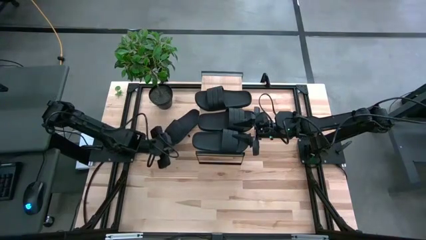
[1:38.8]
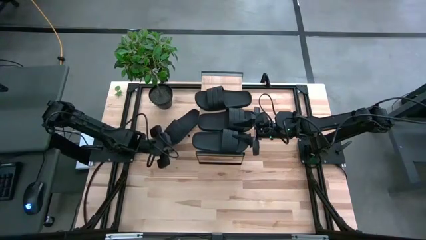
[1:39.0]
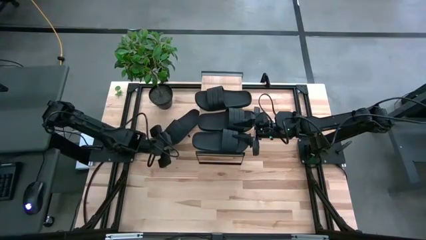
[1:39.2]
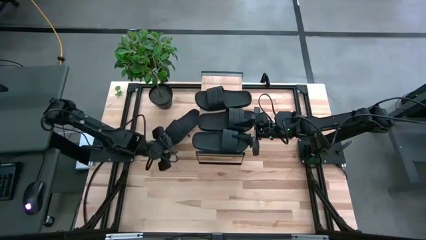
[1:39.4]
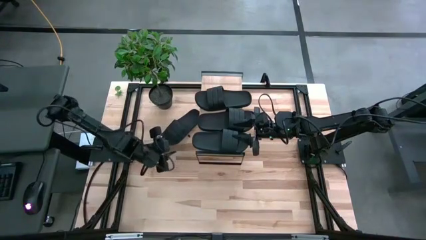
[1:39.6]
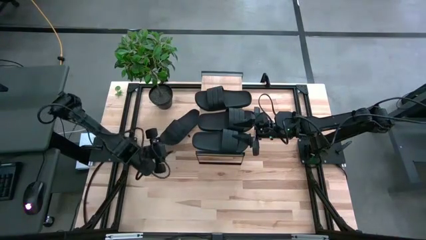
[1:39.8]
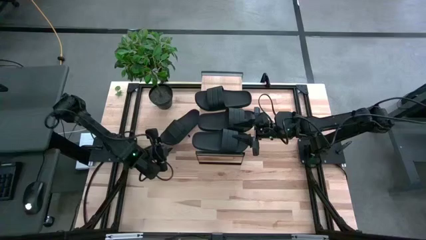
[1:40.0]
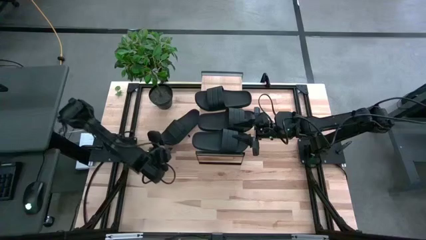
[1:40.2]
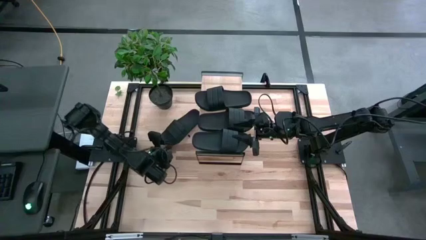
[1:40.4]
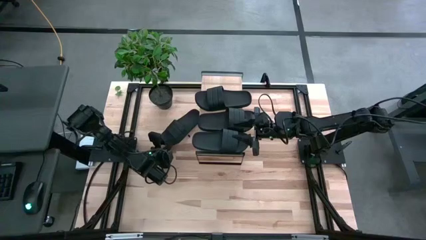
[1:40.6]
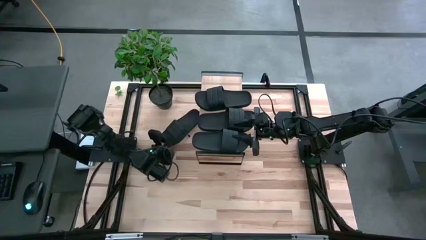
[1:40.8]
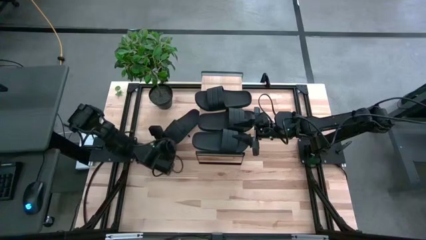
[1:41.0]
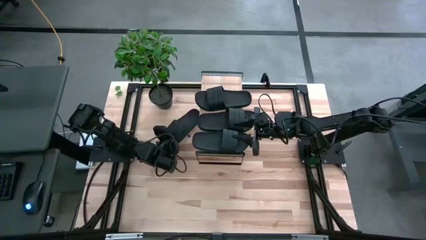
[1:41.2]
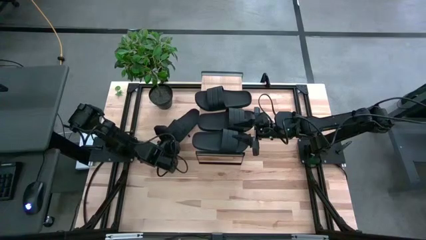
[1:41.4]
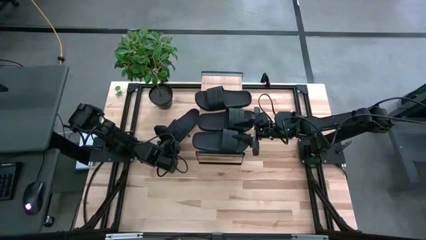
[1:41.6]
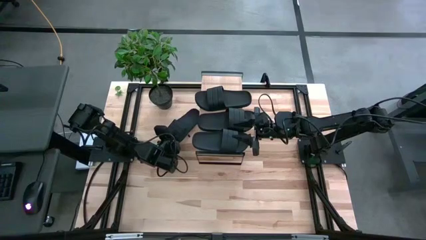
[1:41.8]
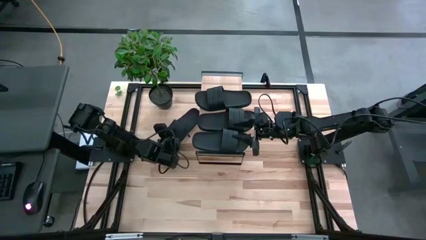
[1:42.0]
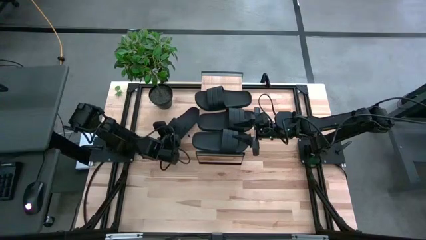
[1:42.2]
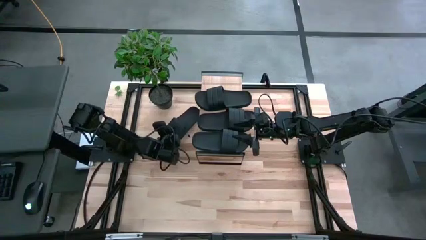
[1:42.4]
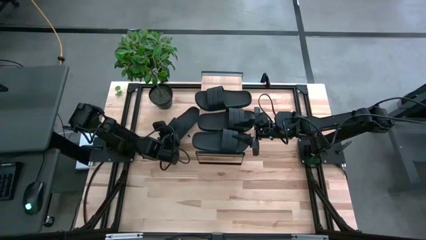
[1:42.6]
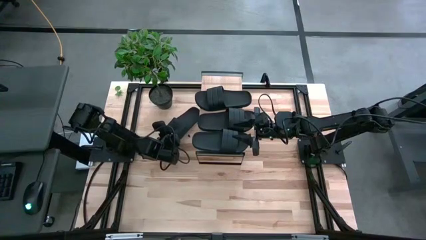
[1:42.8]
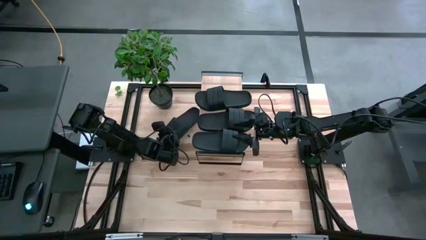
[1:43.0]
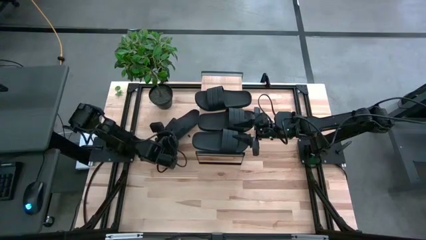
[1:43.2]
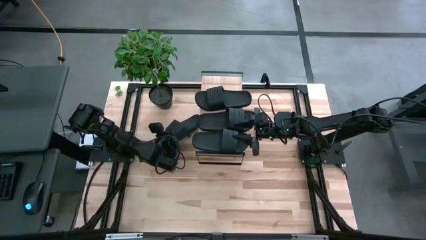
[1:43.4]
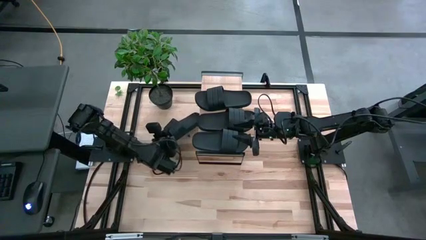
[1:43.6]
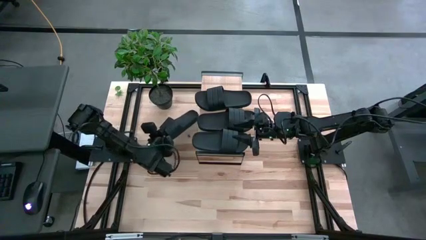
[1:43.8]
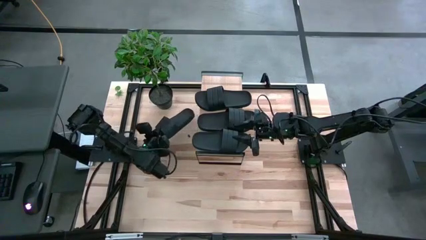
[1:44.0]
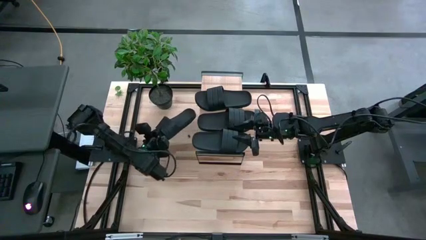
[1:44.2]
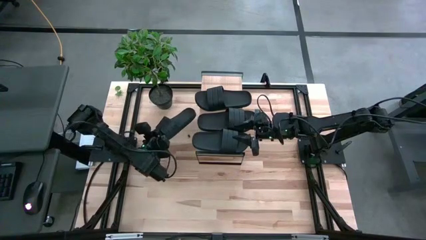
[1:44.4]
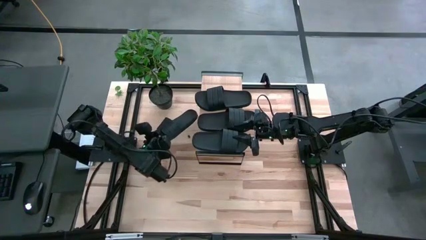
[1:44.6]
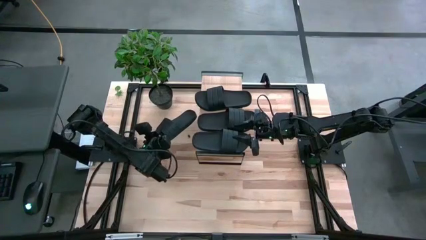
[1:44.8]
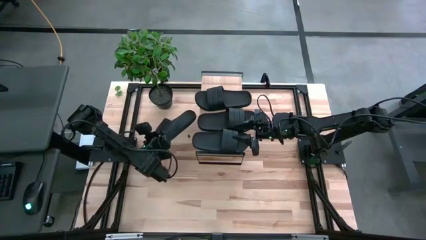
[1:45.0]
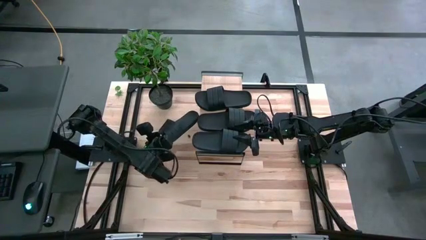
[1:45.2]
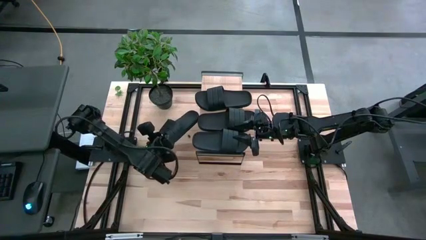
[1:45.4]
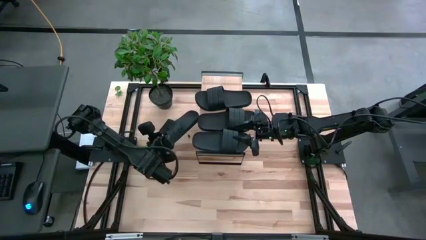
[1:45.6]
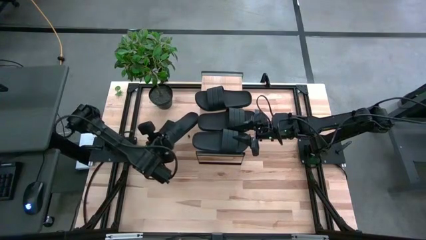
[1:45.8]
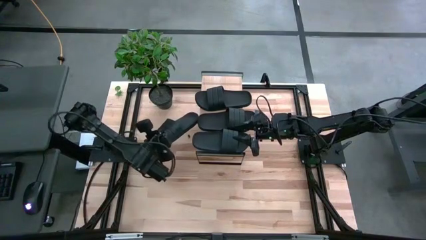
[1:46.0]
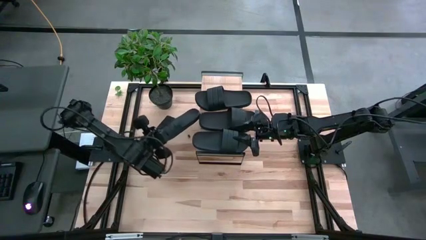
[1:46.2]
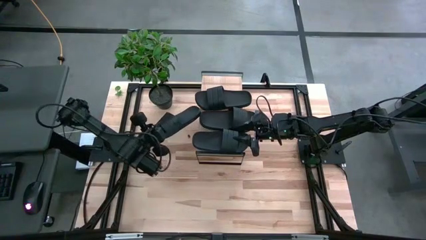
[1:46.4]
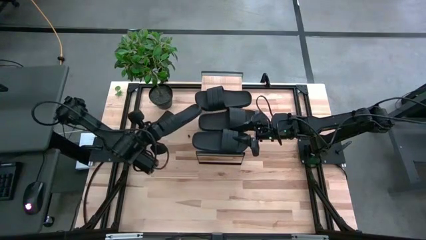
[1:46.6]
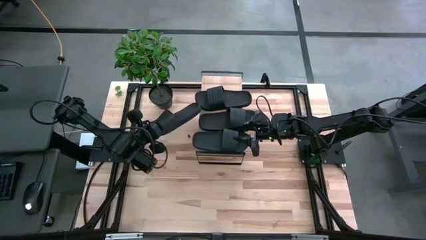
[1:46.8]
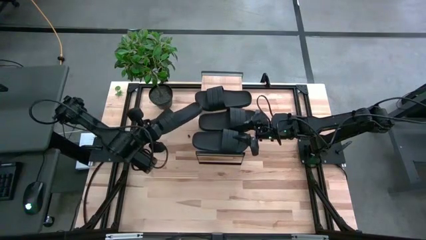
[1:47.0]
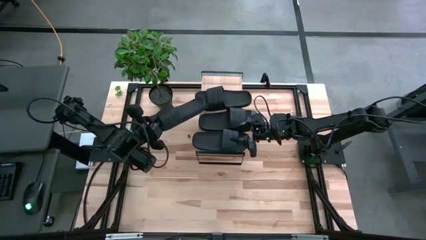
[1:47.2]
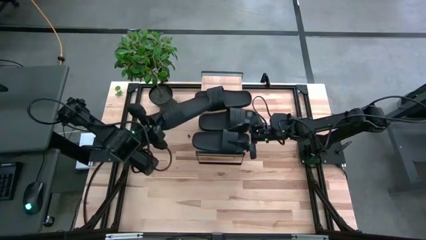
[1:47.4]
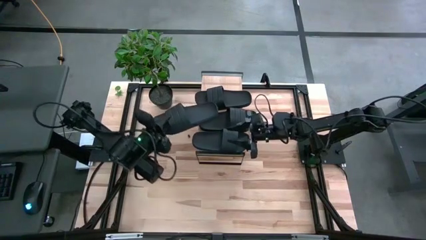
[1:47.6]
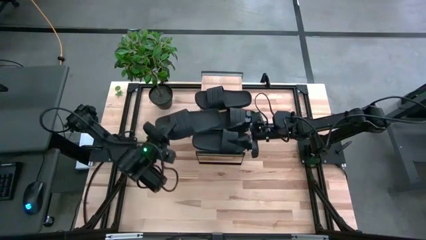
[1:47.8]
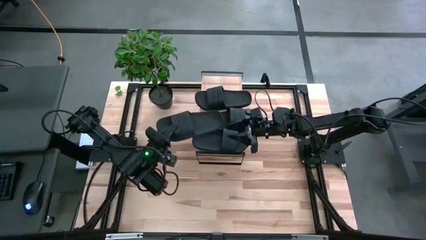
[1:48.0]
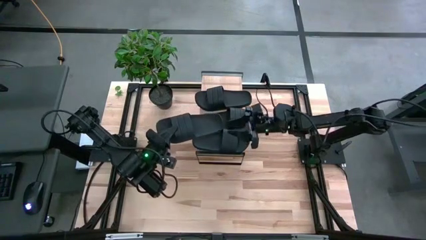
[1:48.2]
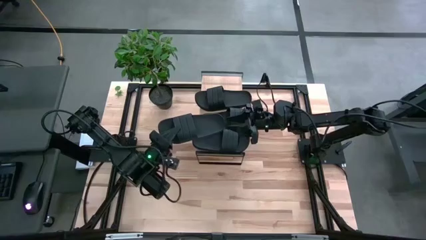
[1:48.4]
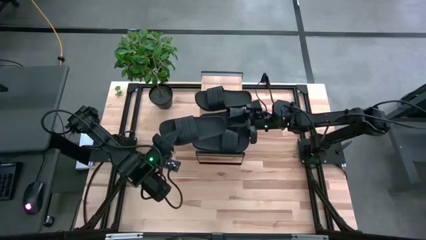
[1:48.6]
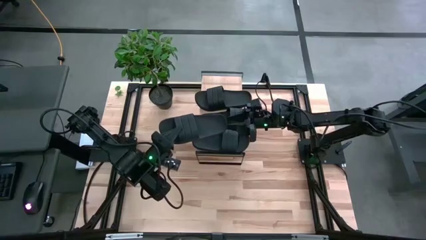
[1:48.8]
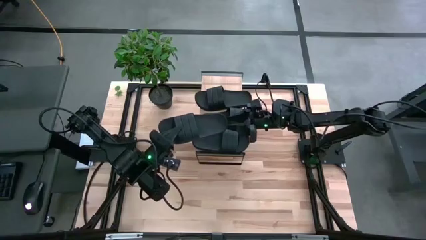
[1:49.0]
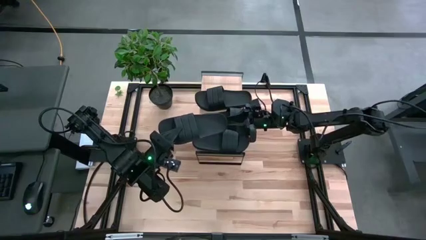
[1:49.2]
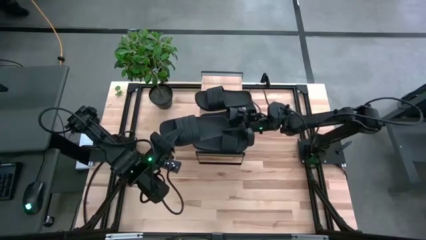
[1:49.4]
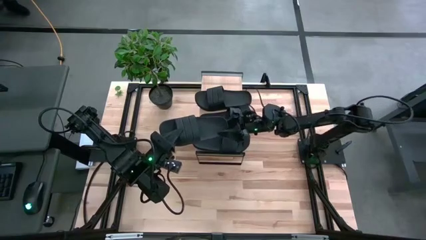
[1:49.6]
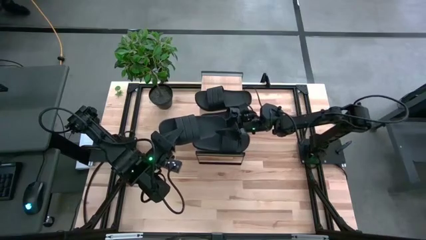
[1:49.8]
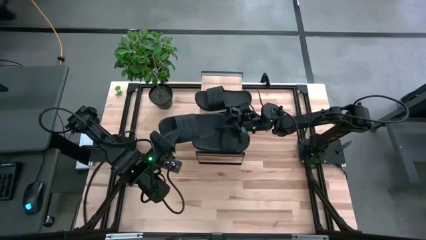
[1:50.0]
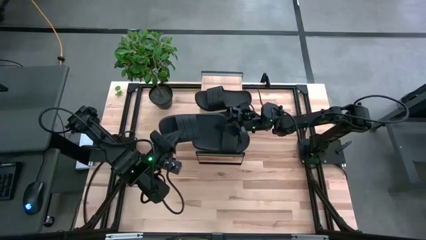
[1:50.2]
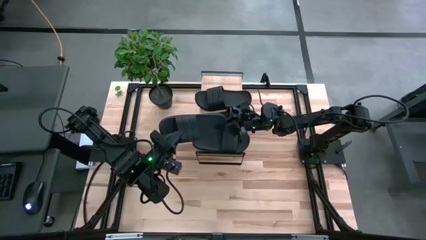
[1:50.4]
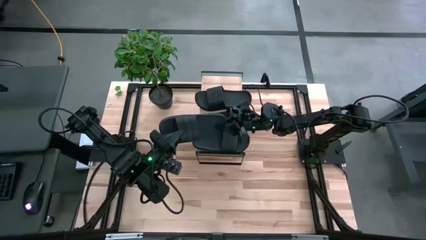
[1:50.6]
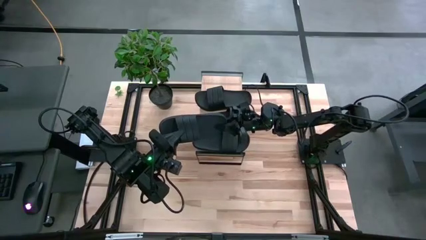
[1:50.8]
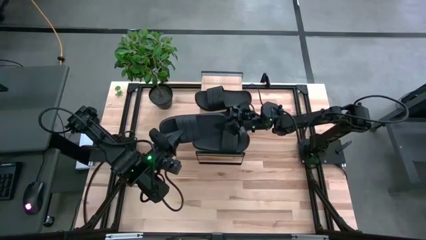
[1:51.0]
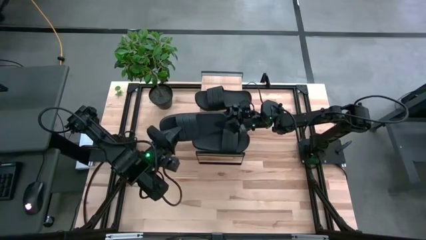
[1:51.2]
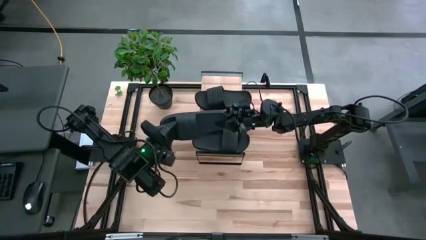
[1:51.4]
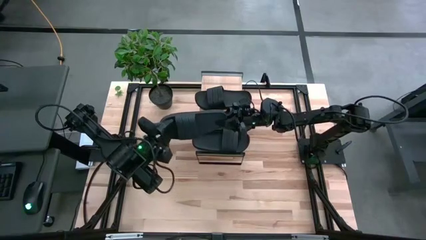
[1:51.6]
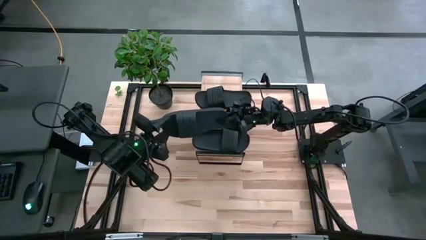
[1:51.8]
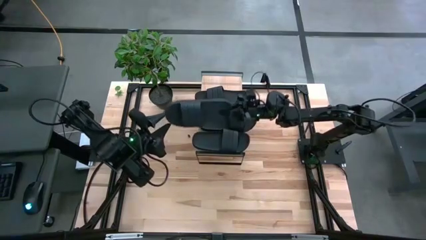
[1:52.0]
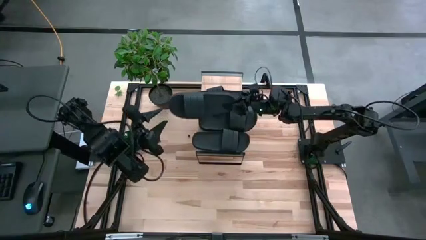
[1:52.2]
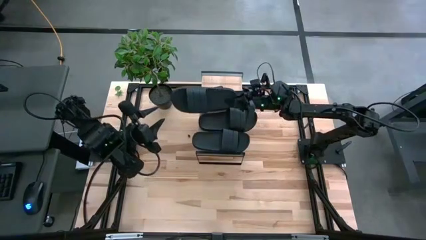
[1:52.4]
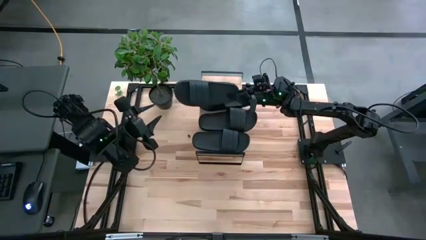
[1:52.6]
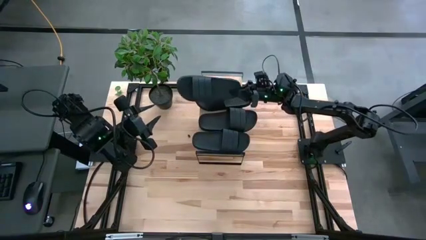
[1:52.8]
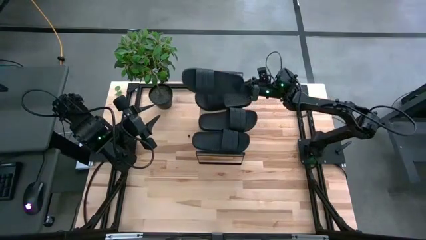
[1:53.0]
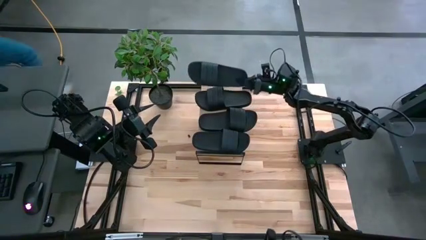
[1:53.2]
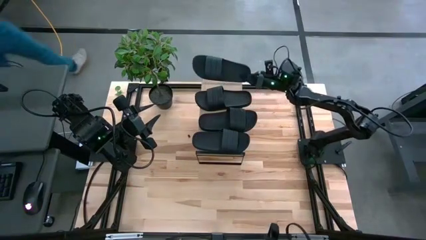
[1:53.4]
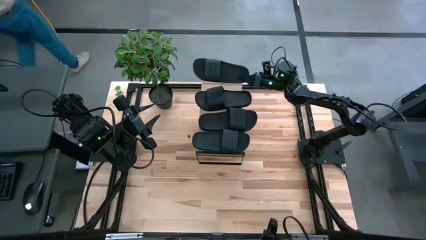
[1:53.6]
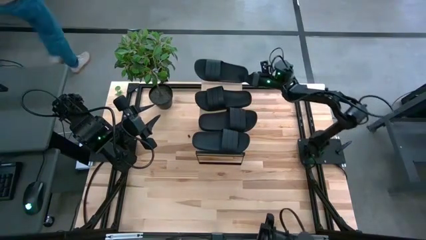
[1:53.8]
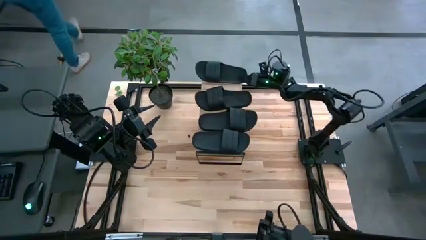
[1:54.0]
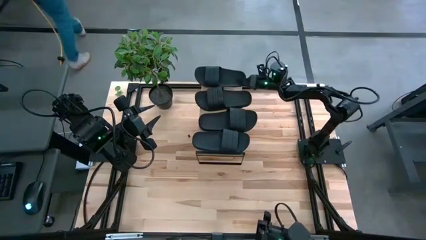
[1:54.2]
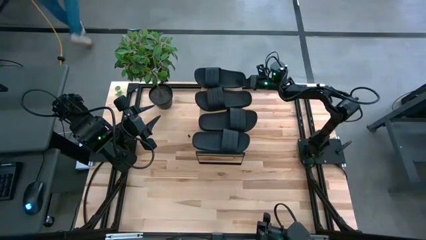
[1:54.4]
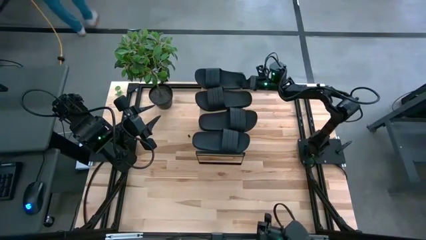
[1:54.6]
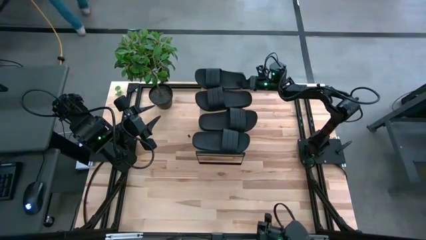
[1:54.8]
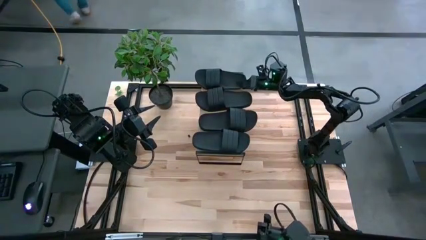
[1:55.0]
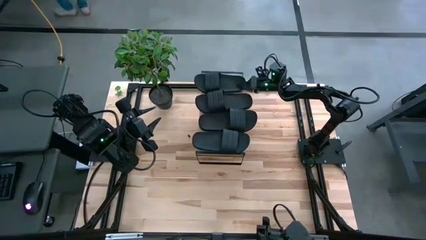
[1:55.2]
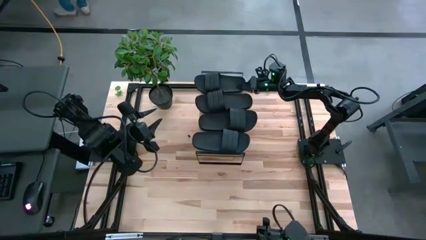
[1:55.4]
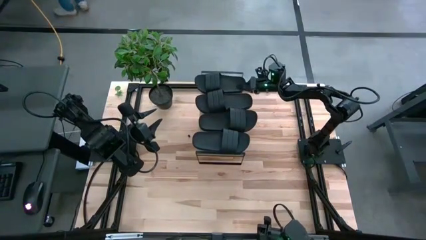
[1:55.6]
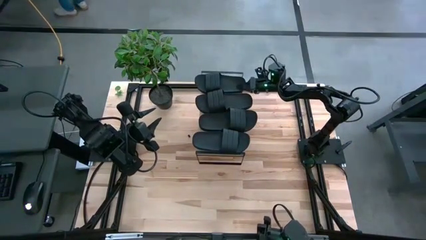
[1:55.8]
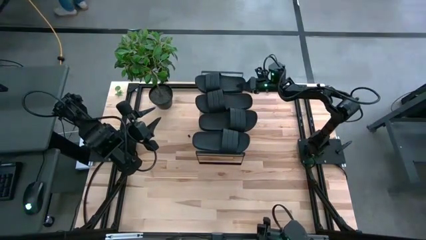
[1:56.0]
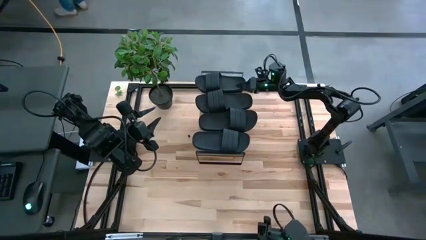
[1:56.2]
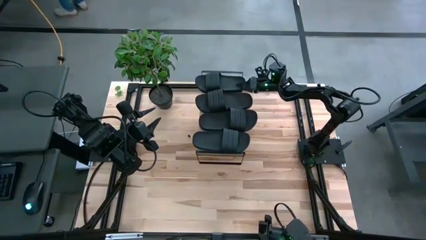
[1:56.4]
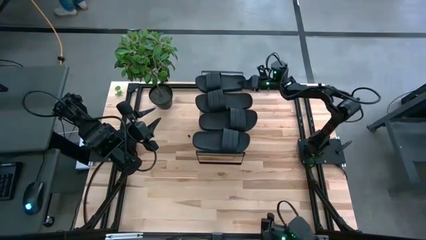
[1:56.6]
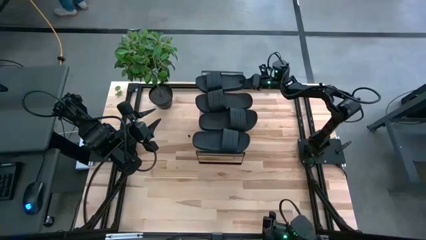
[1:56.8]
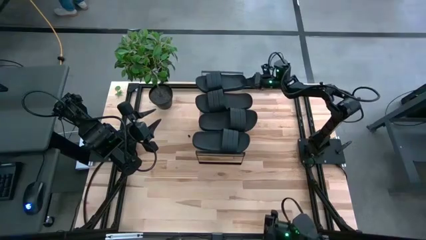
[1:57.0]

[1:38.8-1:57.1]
Task: Pick and place slides into the shelf
Put the black slipper on the shelf
